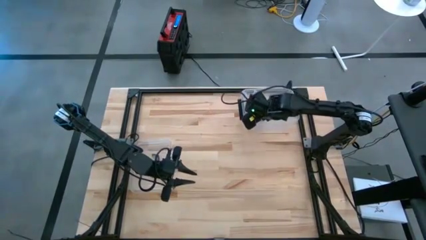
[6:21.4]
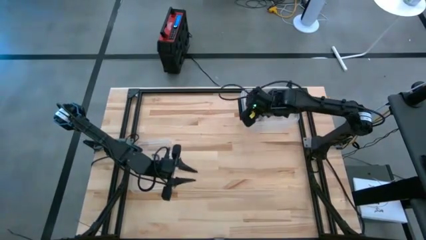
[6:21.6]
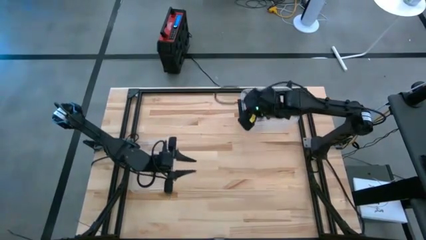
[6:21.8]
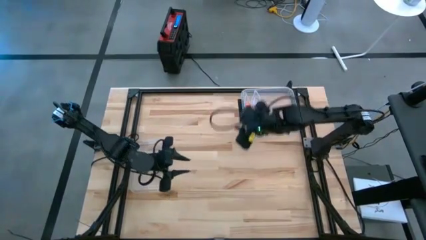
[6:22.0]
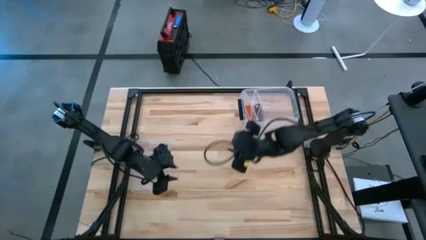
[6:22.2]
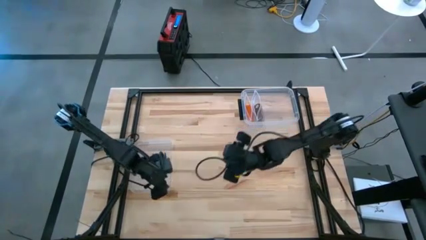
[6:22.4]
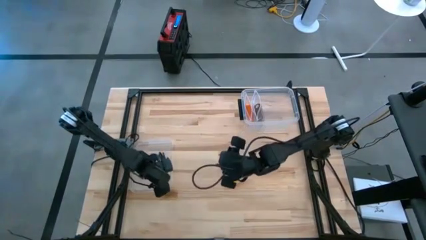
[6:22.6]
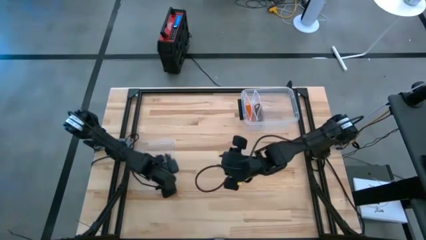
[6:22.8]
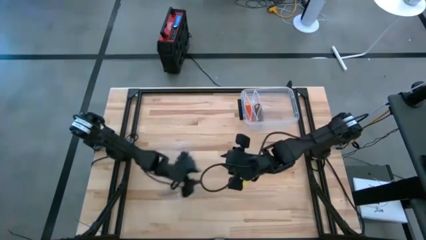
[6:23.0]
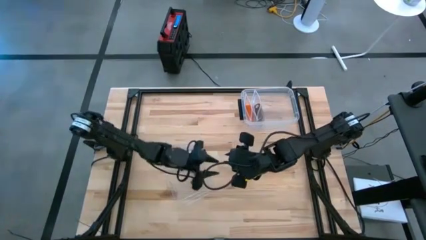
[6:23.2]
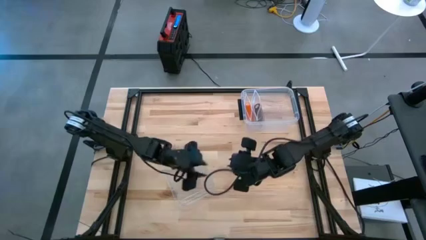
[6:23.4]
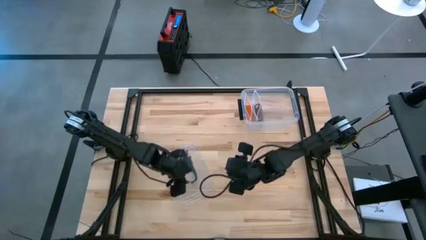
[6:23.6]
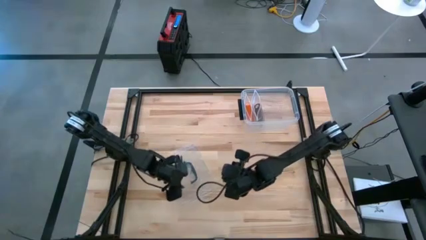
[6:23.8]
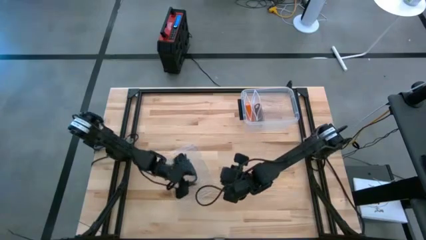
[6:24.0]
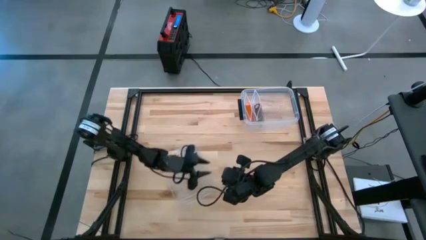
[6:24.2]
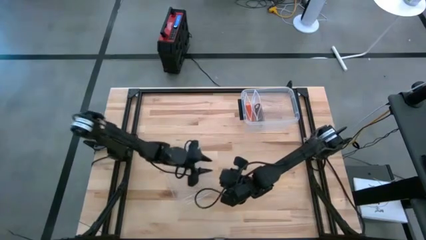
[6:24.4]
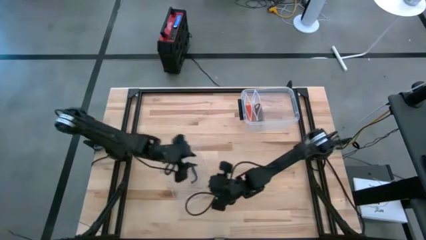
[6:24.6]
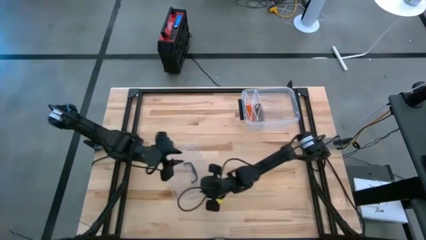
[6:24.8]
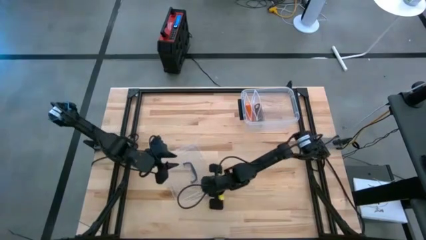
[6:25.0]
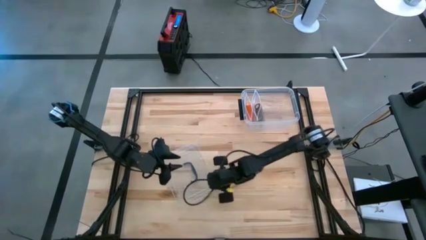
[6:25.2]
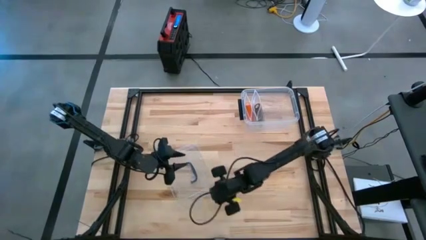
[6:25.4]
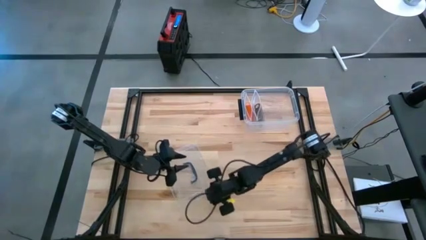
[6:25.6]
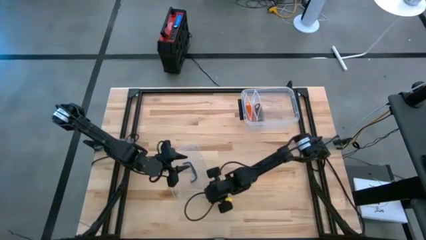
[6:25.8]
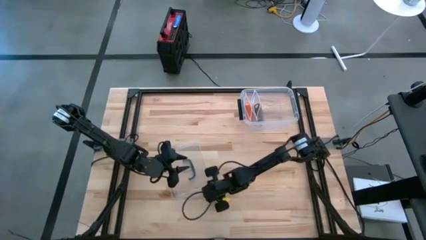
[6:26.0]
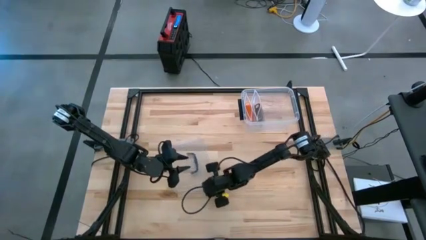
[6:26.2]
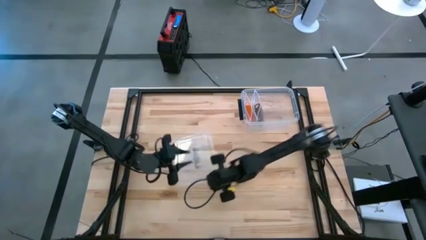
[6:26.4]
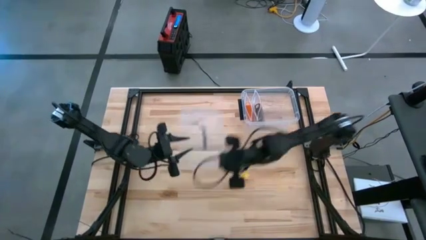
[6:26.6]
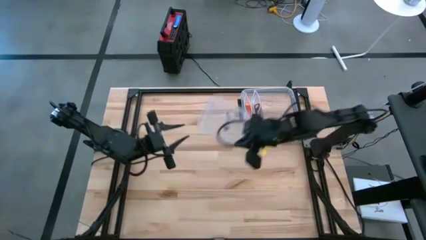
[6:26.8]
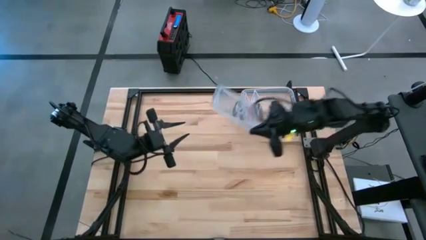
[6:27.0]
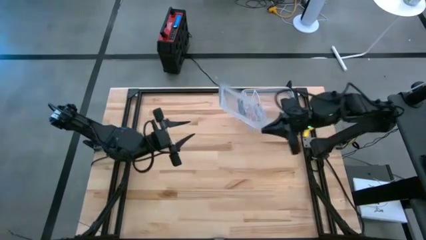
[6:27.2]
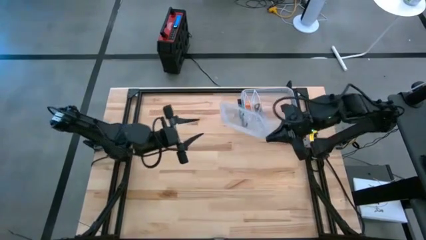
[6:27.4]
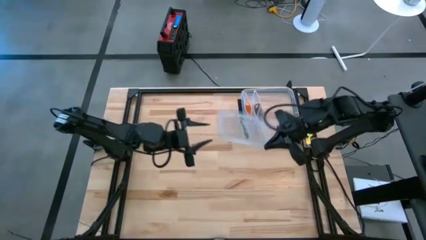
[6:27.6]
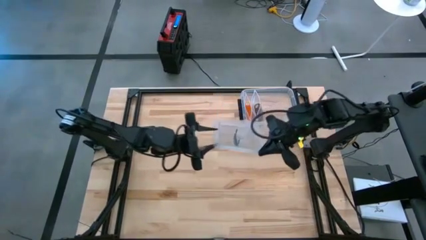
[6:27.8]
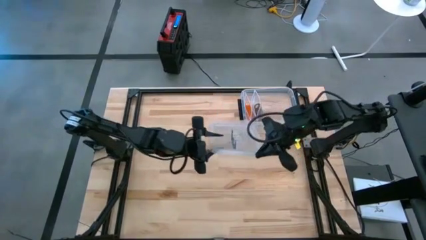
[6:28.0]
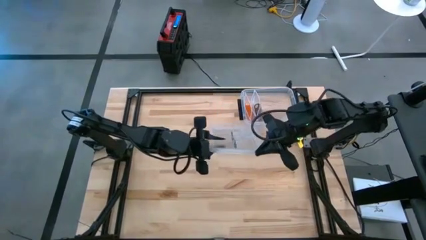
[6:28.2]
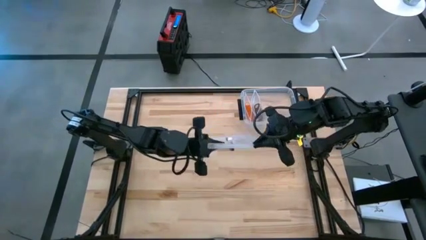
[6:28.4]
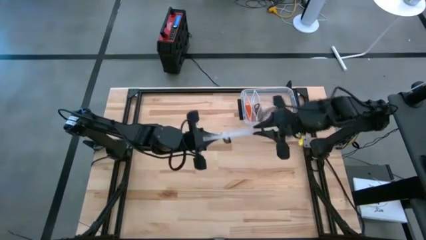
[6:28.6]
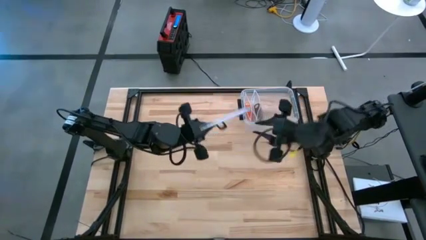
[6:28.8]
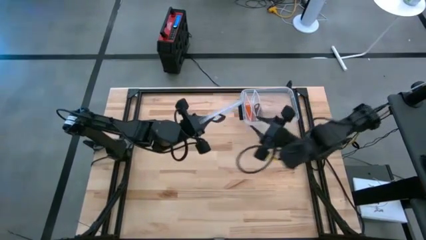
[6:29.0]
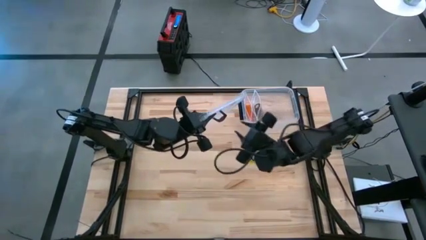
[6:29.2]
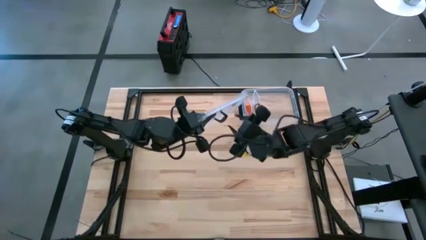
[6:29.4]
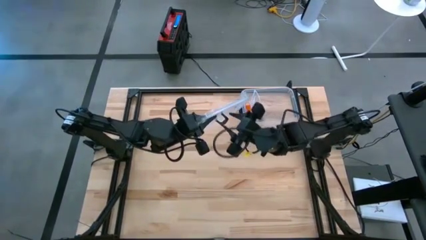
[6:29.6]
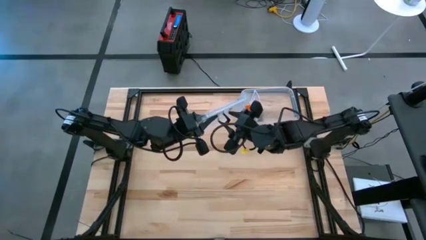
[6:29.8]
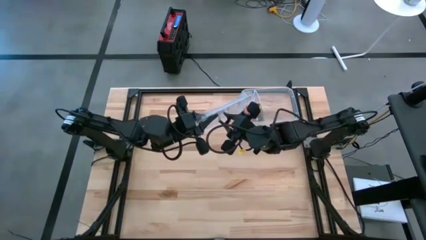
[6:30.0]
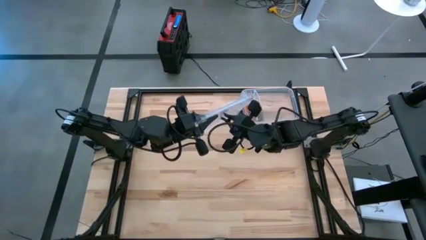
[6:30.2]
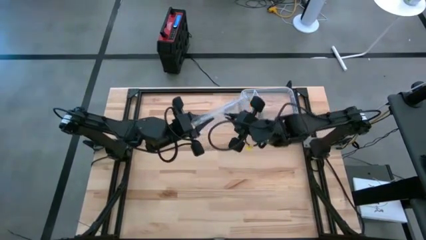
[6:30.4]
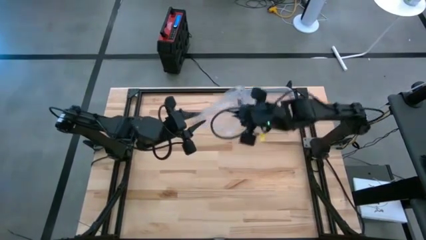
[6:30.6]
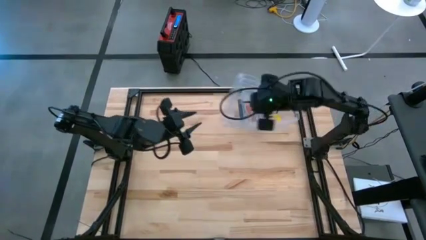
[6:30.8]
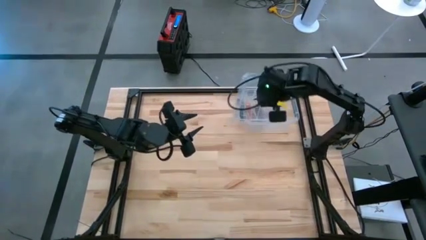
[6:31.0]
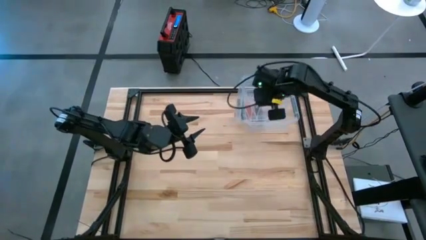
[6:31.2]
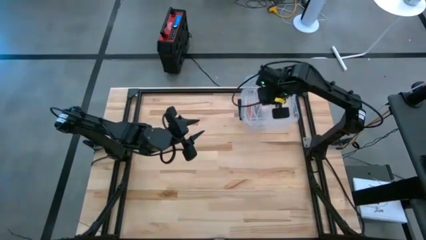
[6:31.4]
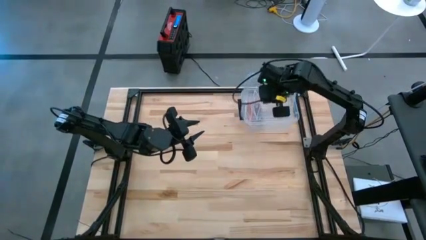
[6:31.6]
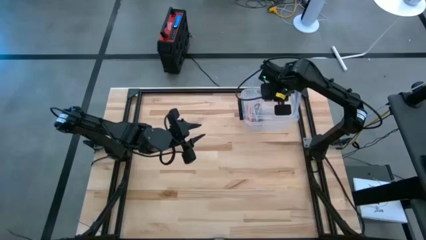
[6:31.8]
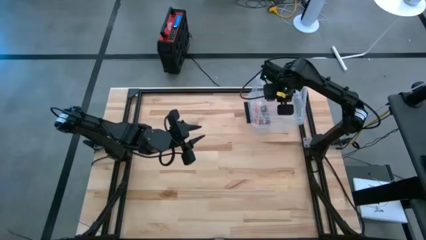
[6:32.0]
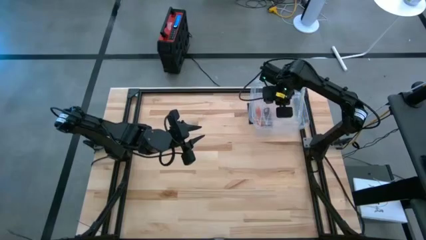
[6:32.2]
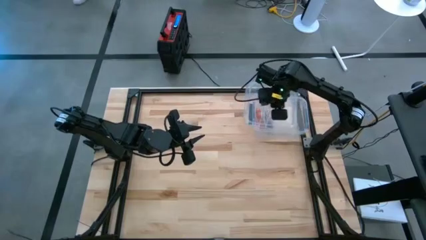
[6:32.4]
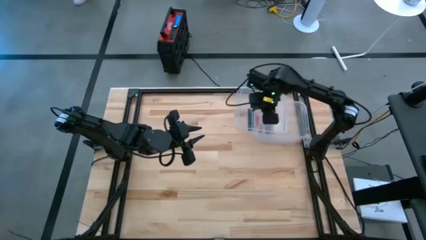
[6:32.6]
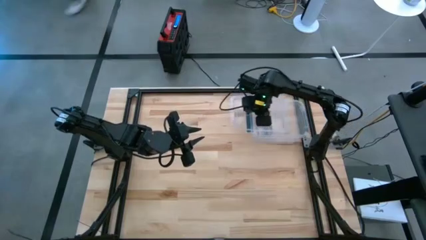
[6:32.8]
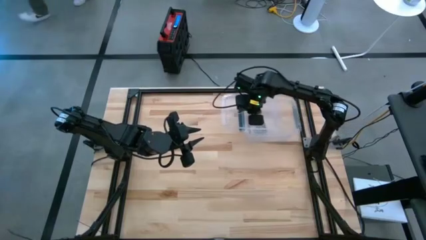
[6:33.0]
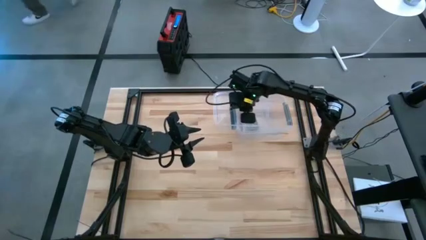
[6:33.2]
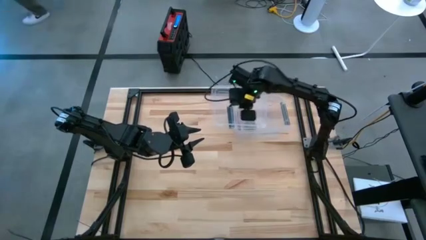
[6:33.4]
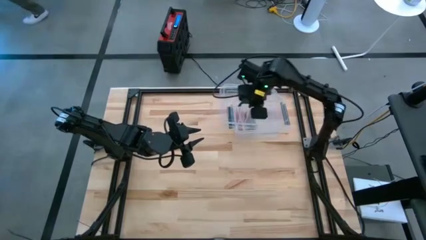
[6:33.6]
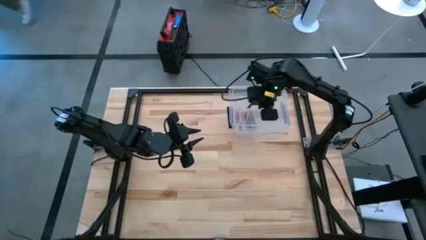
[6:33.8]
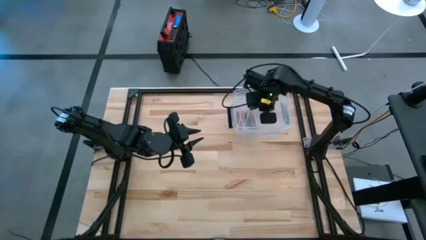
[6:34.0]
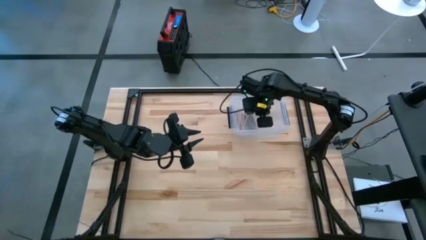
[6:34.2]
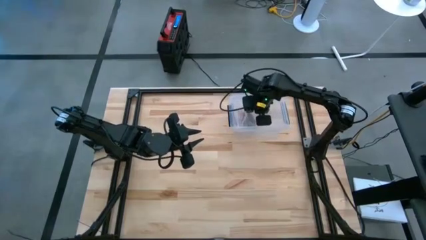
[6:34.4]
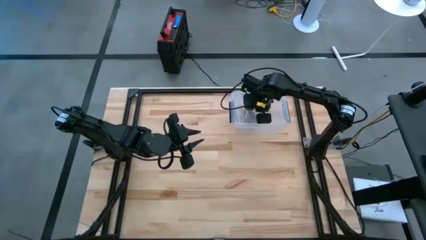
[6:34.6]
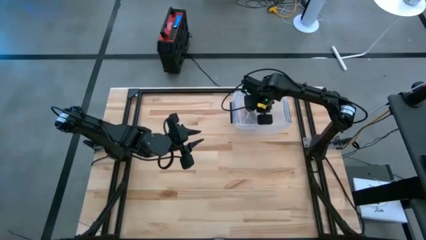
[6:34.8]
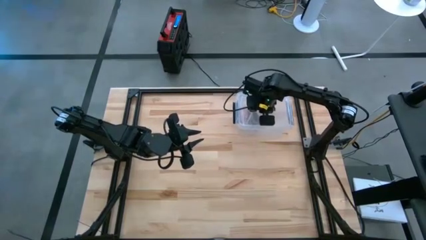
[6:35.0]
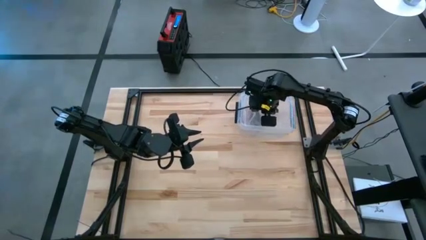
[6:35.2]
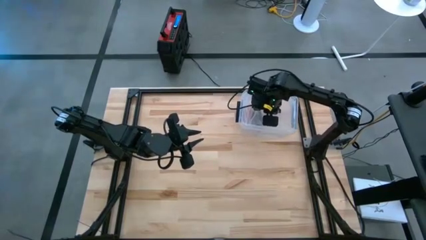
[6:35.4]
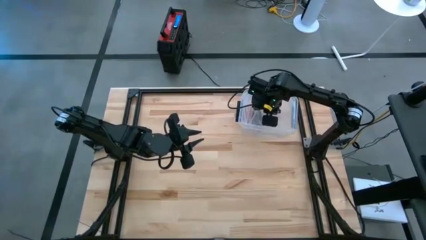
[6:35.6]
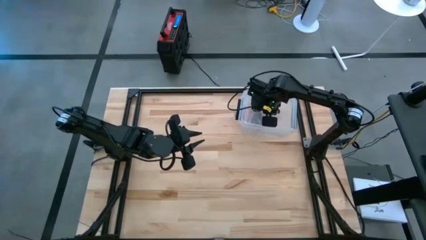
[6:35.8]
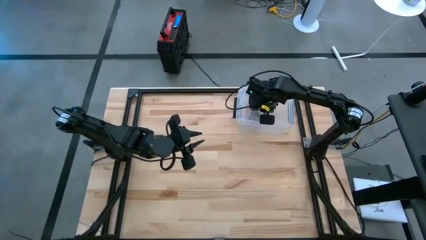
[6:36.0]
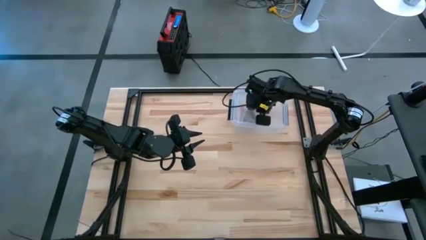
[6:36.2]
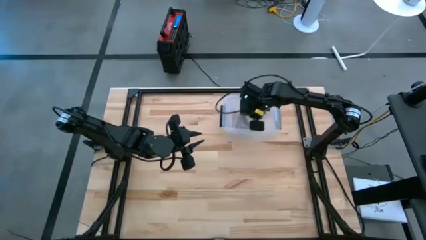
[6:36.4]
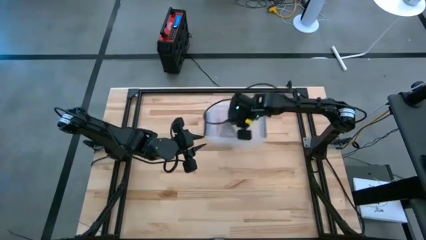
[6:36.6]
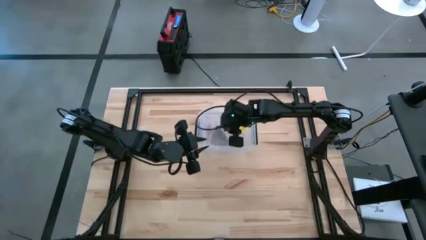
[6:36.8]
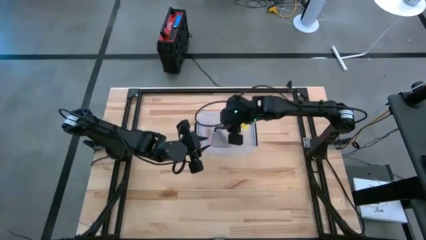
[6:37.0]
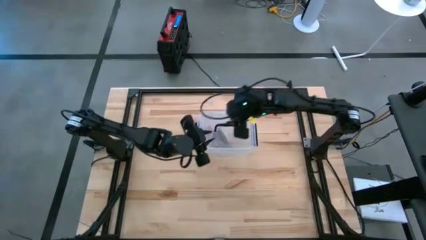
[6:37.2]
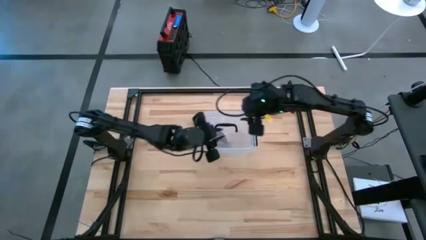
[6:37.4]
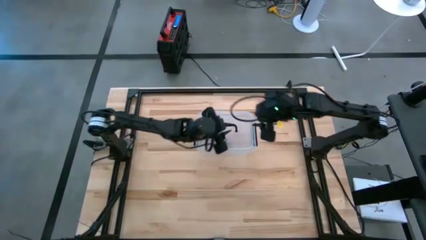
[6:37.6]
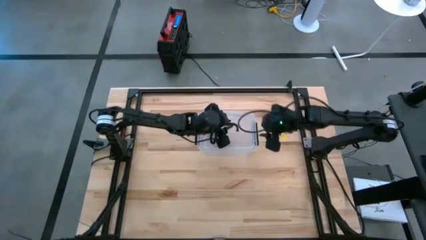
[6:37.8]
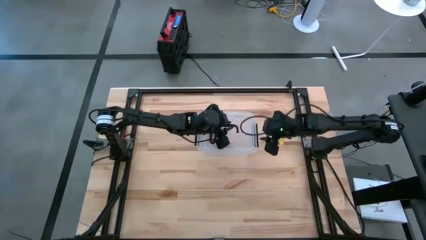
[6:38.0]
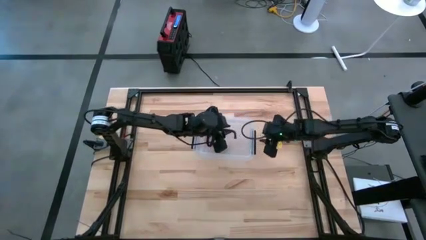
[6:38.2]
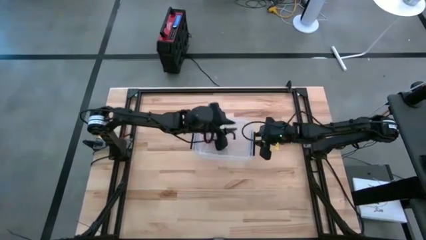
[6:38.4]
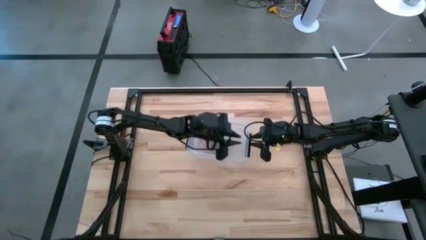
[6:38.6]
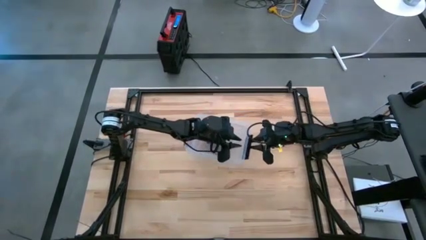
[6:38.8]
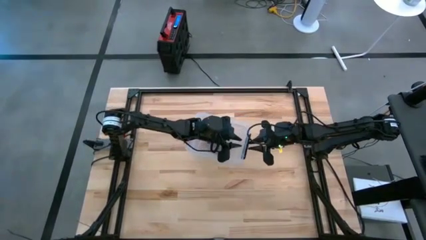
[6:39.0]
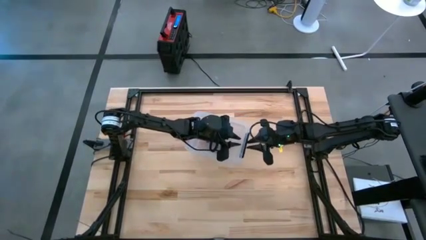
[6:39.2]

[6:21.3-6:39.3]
Task: Roll bandage
Close the transparent container
